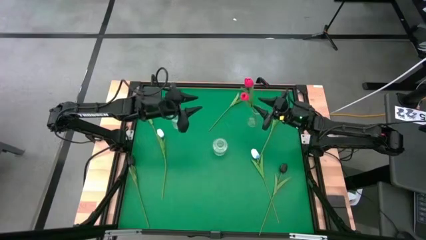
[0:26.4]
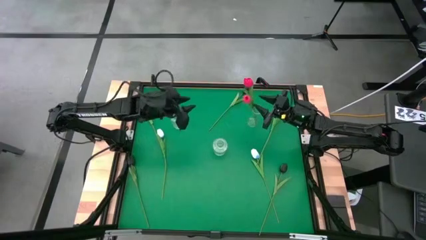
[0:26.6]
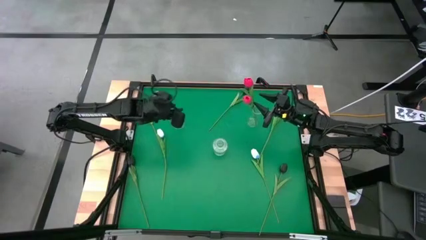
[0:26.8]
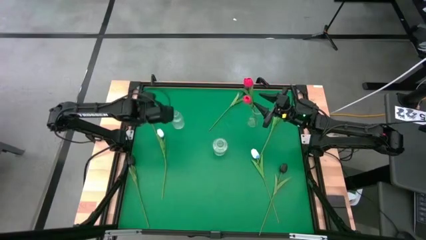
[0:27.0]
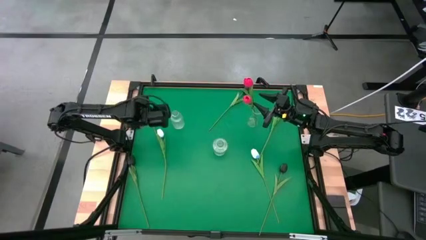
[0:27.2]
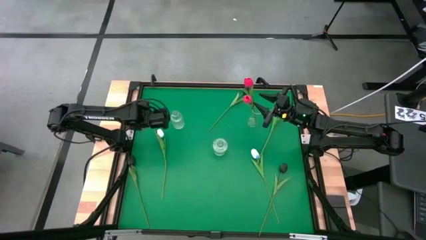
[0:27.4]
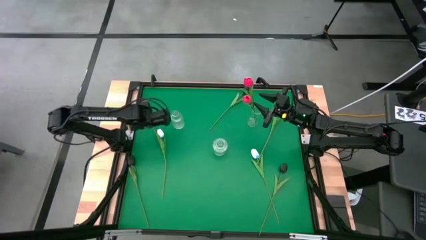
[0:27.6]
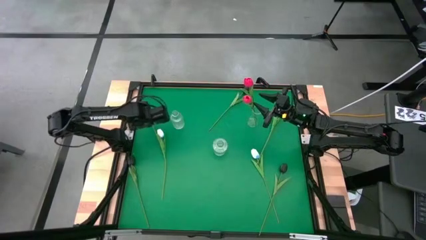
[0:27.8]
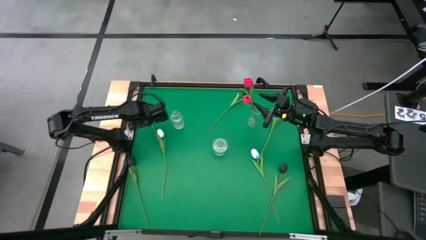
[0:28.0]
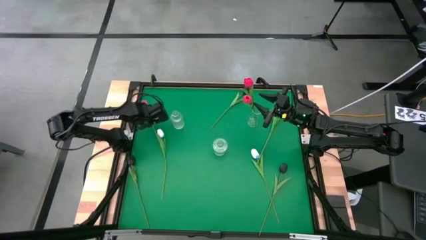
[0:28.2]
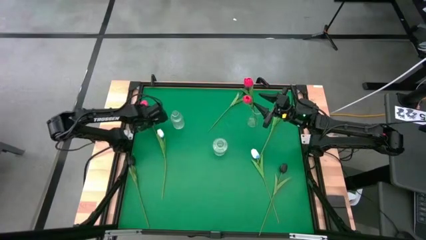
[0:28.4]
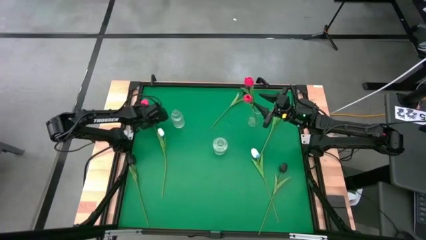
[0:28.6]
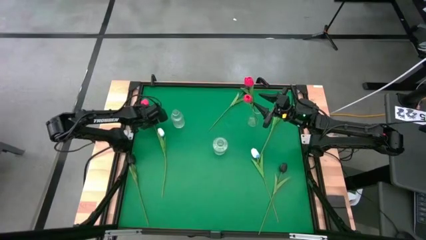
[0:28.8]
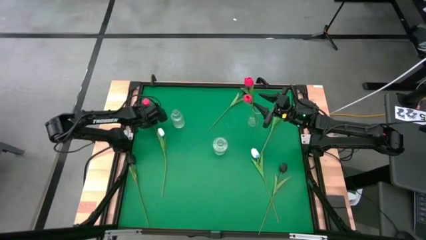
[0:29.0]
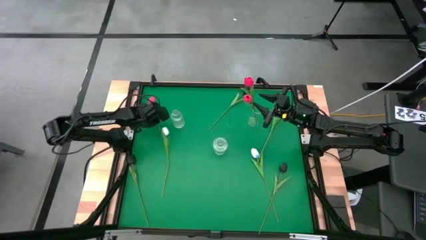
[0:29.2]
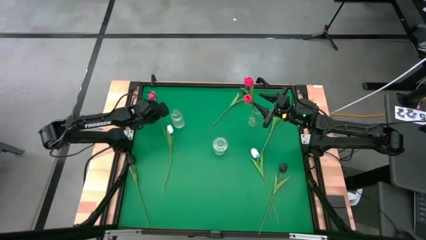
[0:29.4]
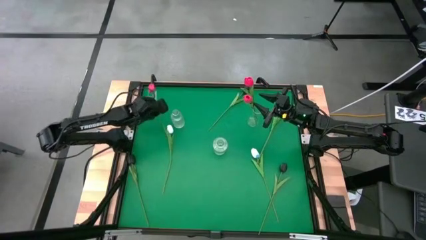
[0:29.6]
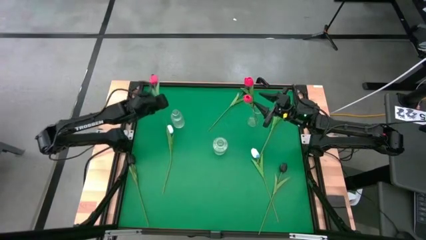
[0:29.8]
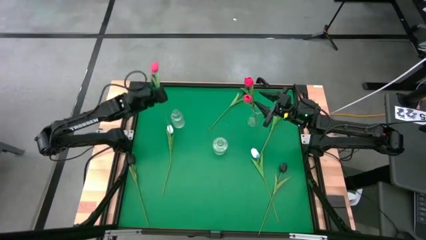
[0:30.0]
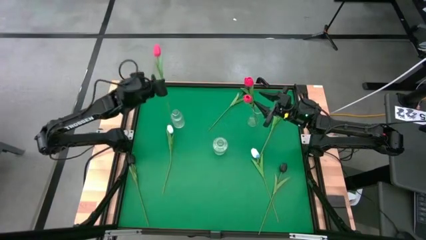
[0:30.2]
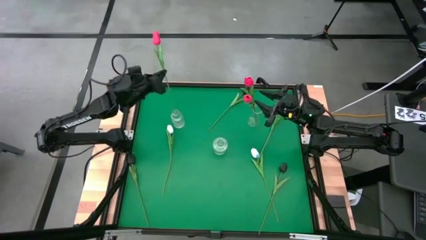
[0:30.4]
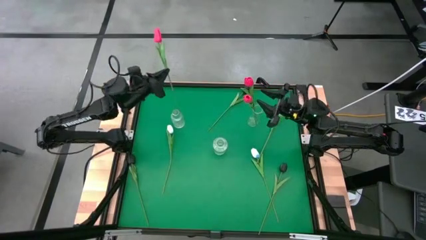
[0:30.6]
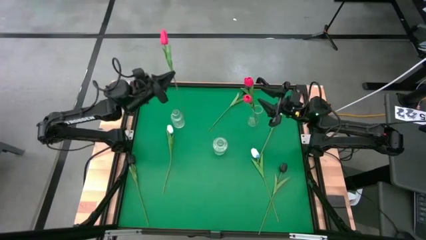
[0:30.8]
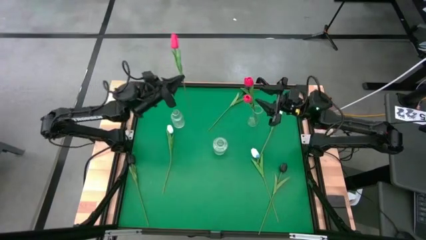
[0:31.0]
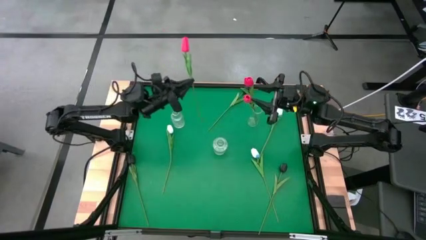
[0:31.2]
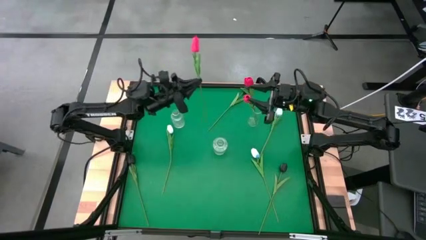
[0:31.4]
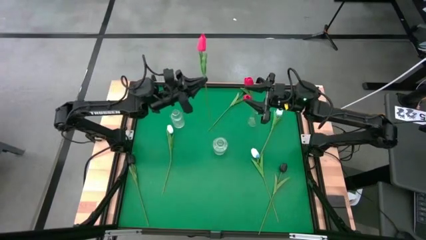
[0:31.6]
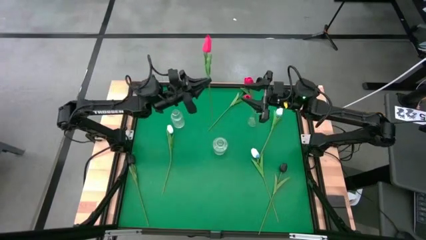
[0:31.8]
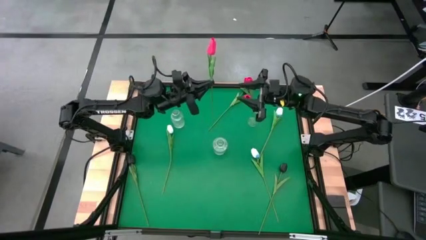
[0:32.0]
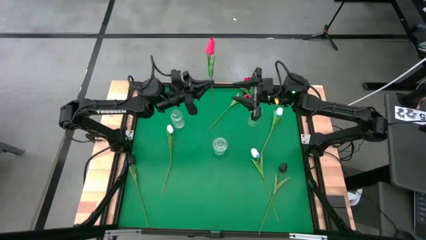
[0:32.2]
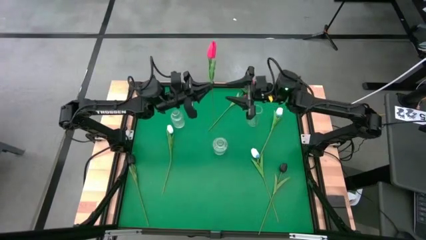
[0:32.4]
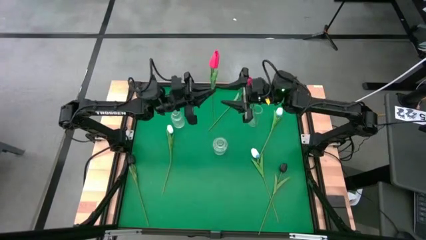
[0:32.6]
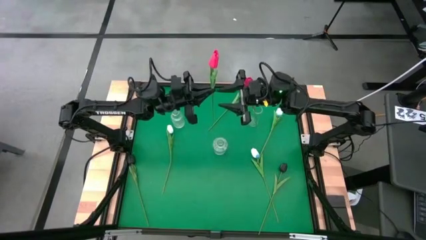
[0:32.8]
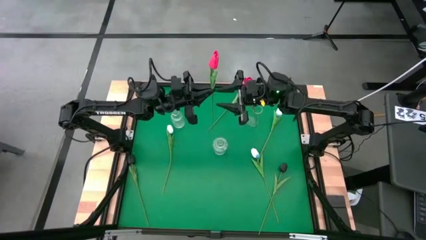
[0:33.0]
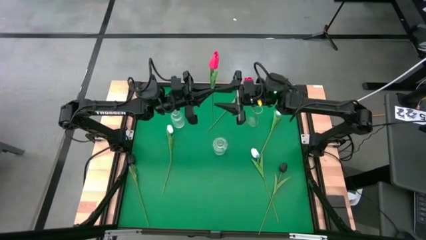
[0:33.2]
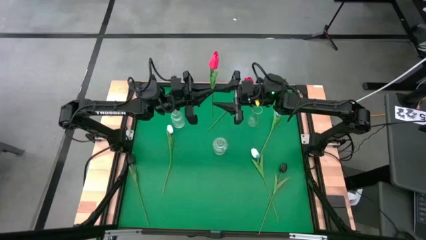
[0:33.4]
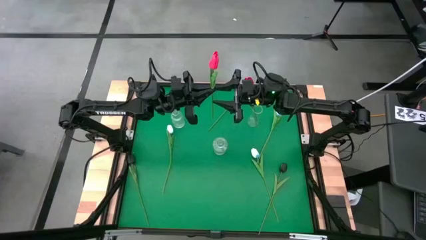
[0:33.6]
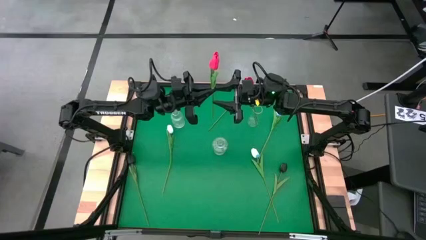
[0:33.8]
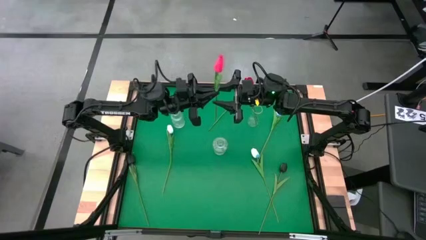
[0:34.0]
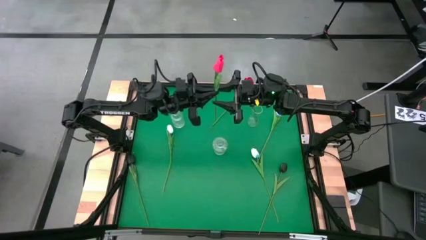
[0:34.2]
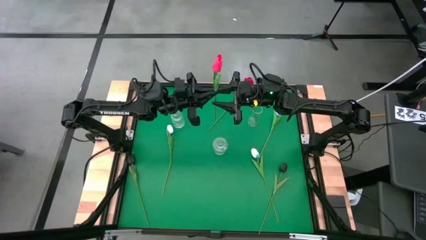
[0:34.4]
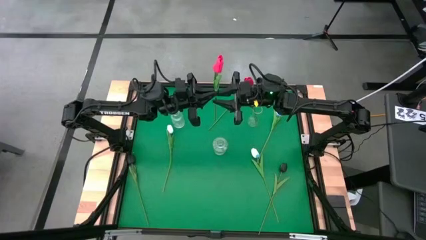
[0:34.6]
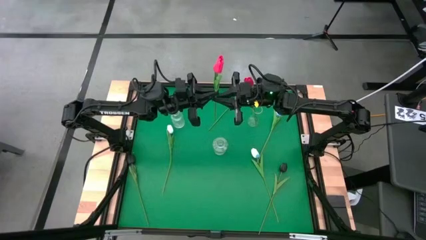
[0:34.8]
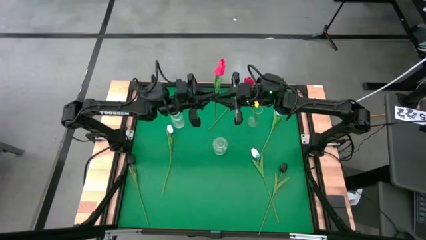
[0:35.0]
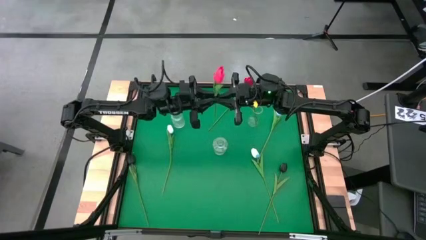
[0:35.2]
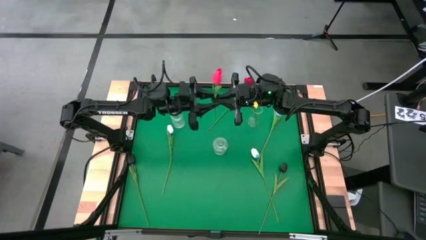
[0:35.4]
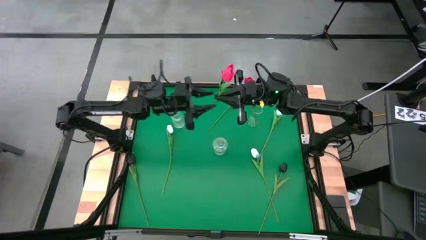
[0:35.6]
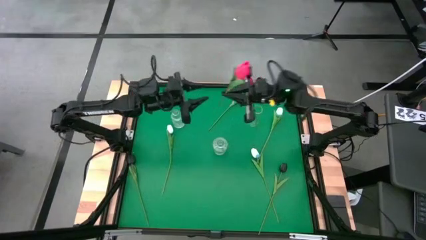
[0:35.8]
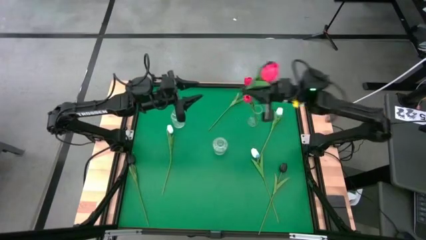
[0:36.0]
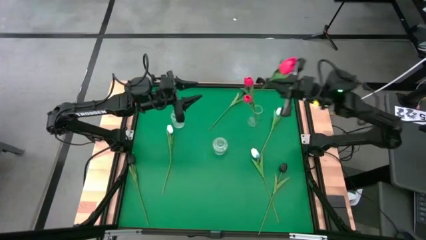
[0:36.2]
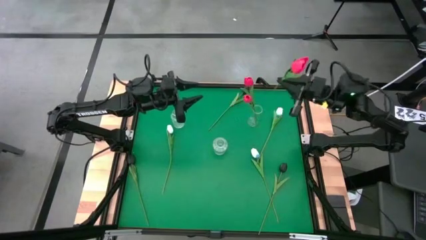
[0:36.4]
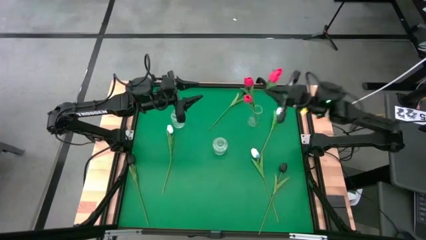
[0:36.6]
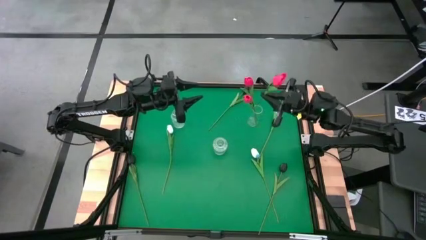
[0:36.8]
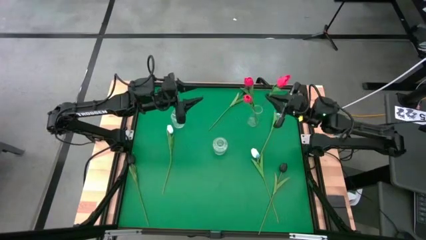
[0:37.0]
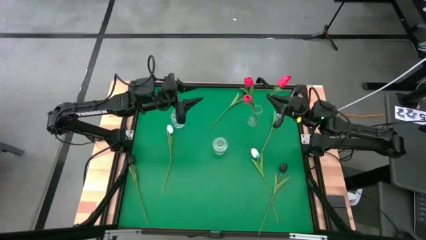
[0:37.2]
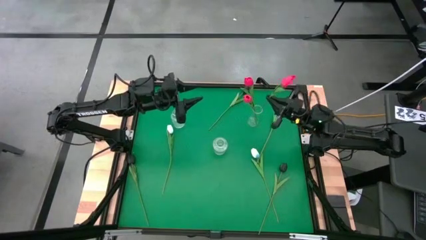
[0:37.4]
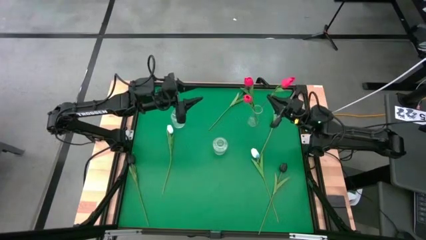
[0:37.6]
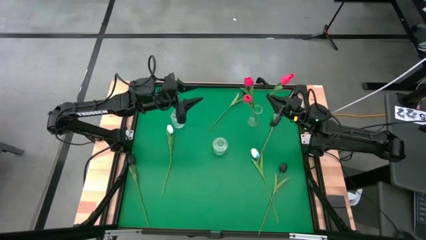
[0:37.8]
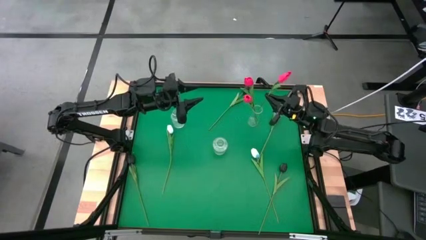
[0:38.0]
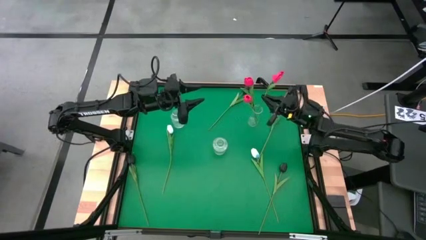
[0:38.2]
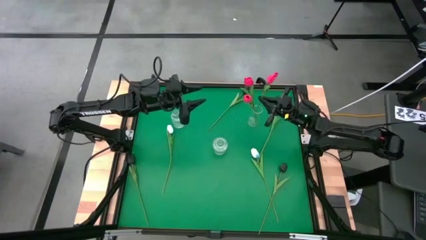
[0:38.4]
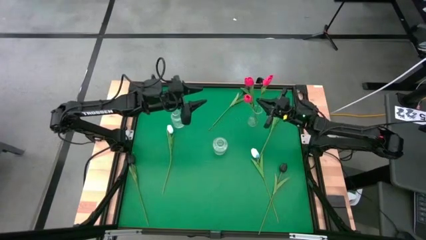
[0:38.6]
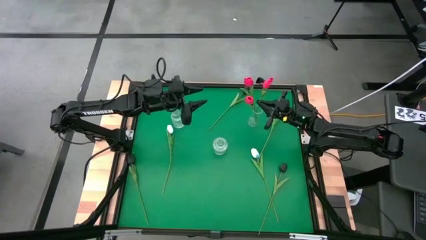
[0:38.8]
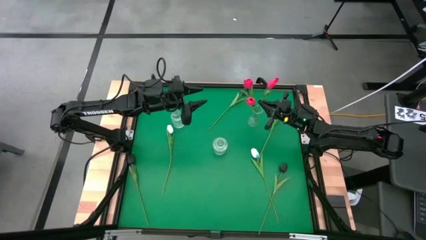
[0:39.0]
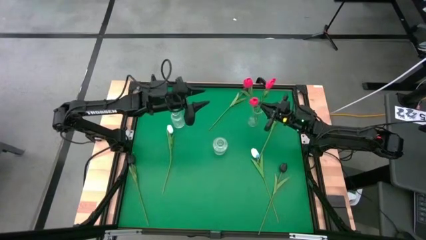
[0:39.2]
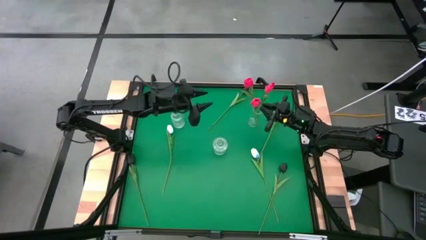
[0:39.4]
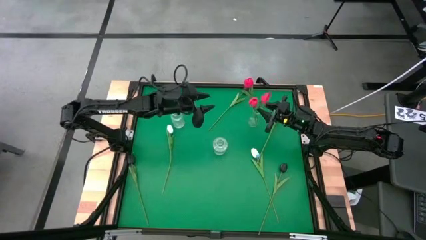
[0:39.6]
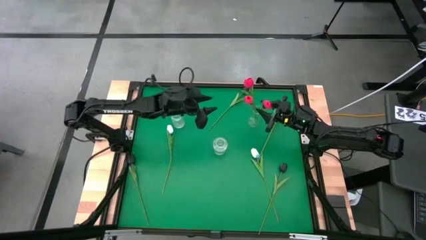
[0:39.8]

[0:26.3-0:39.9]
Task: Sort flowers into vase by color
Put the red tulip into the right transparent vase
